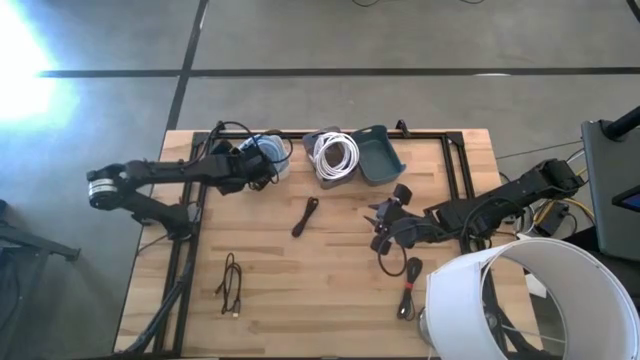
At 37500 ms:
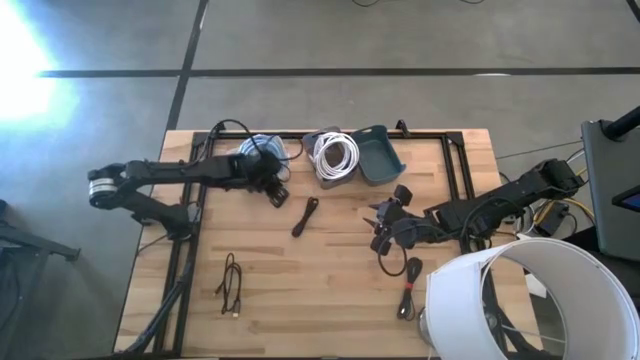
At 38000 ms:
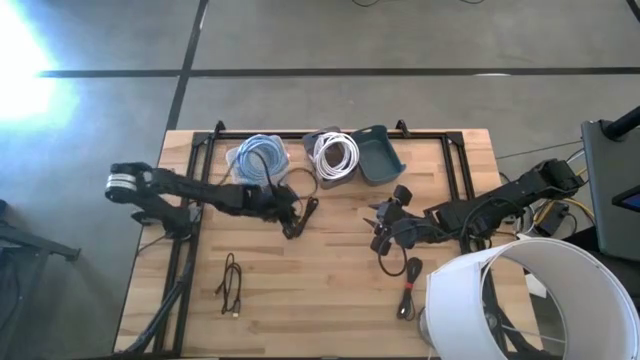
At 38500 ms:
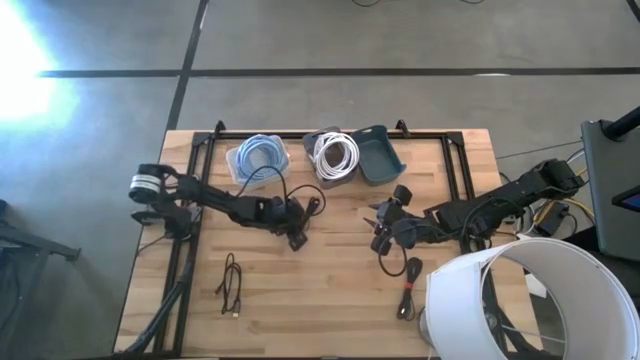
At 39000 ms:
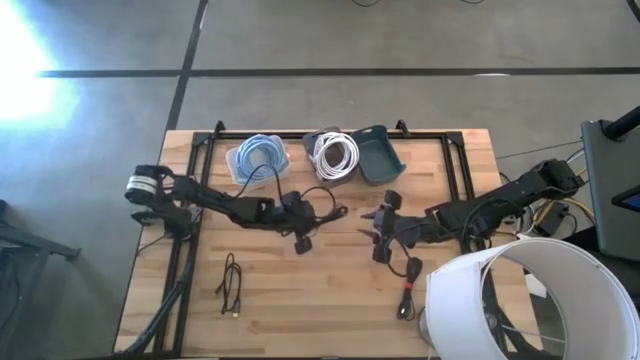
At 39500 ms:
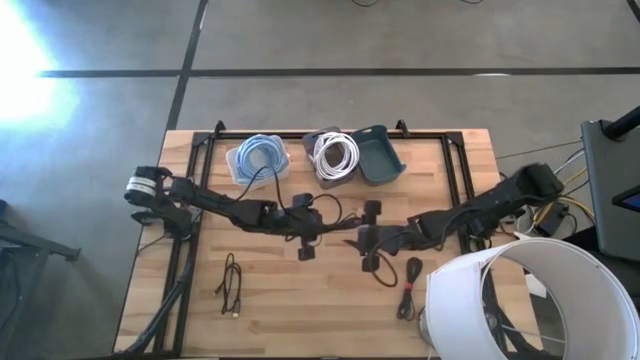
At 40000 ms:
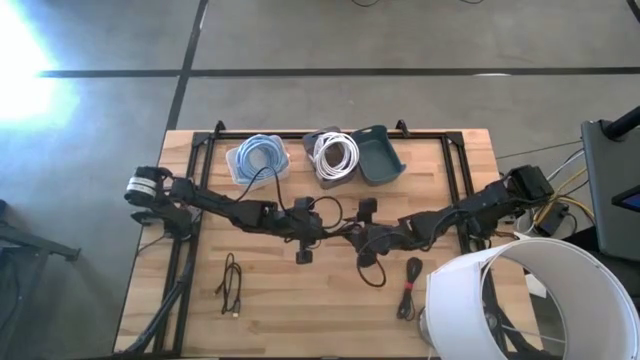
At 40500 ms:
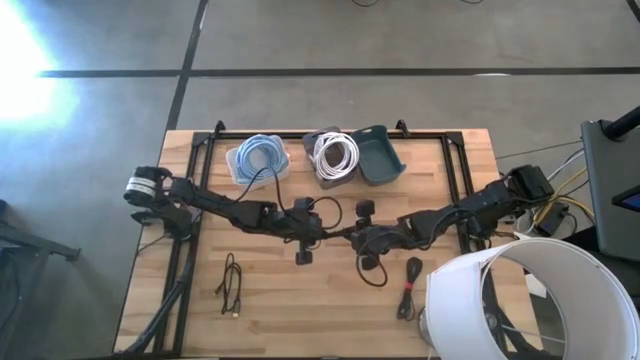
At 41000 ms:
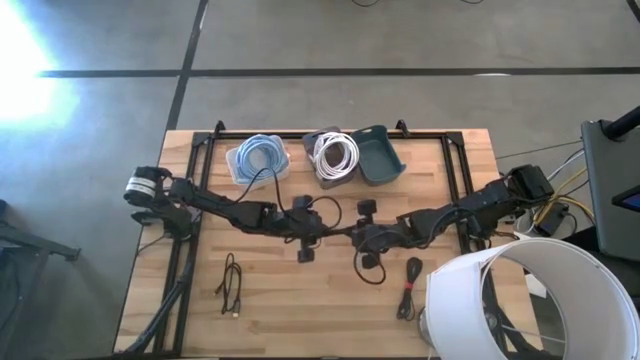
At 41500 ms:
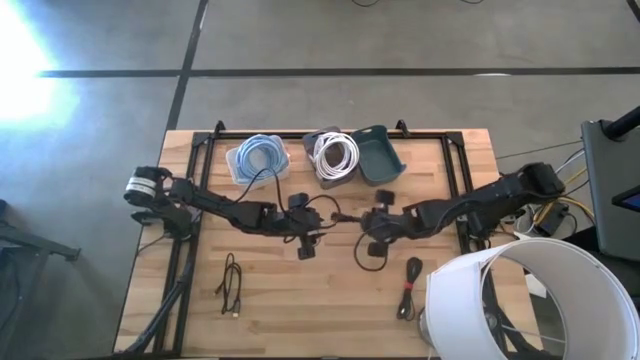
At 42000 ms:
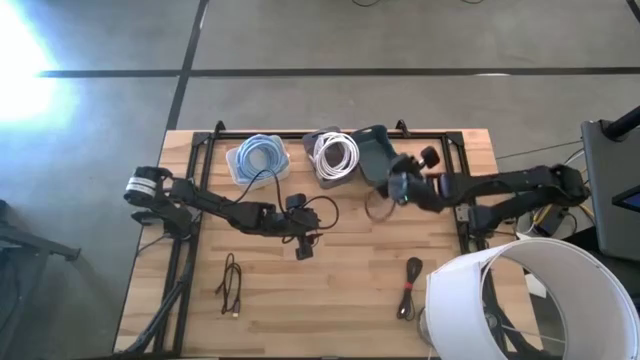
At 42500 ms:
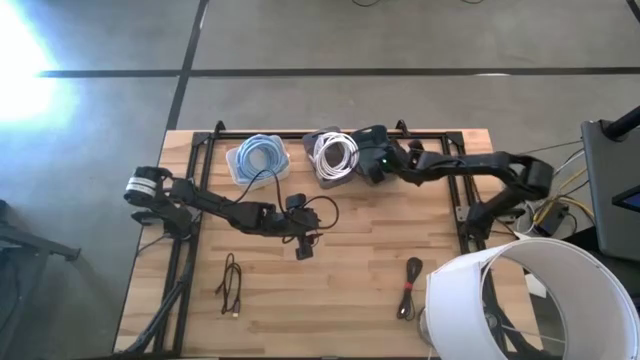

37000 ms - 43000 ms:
Task: Pick & Place USB Port
Put the top black USB cable into the green bin

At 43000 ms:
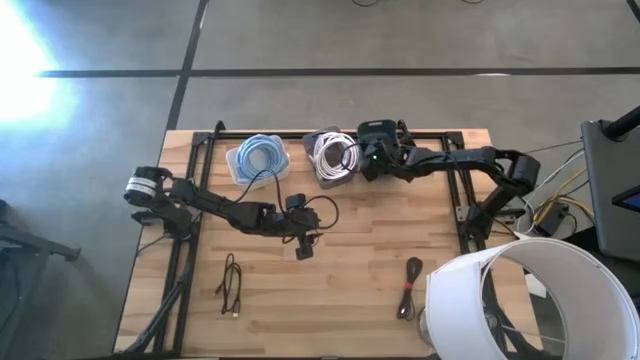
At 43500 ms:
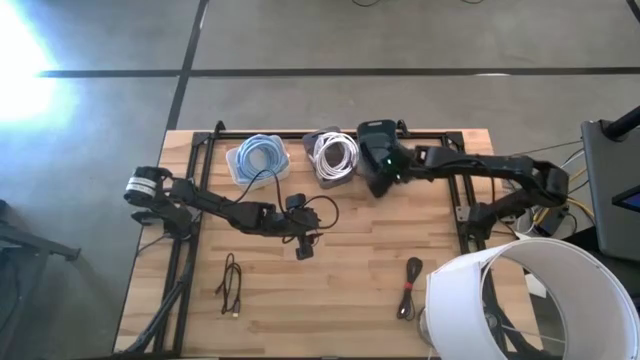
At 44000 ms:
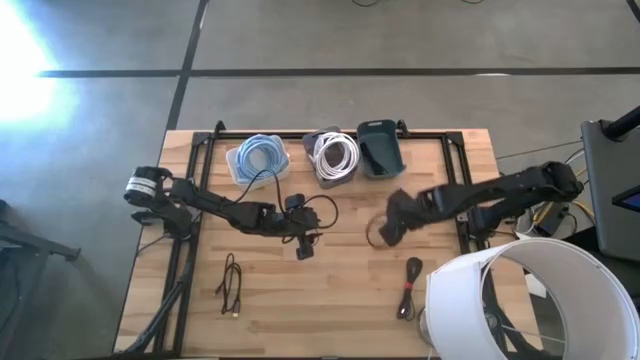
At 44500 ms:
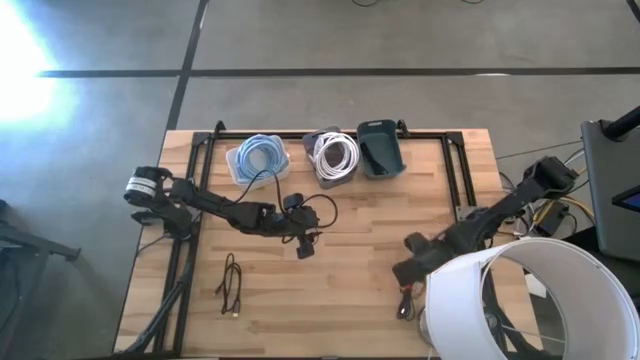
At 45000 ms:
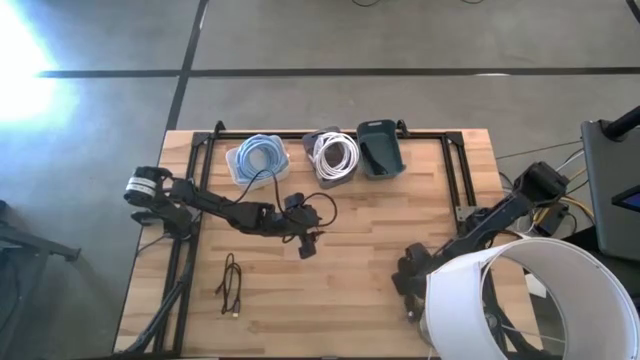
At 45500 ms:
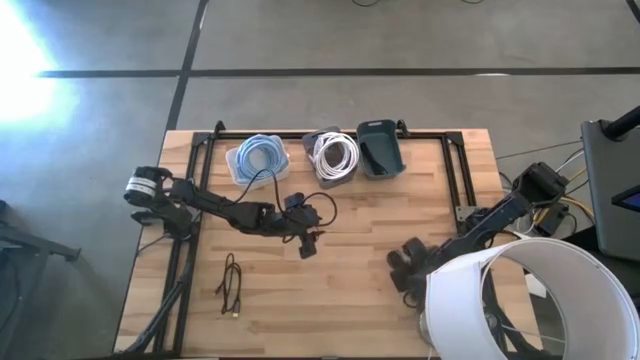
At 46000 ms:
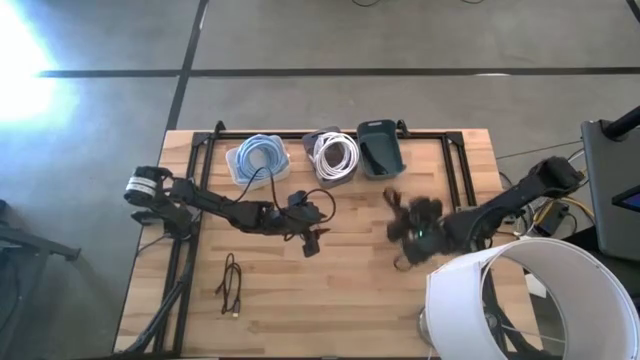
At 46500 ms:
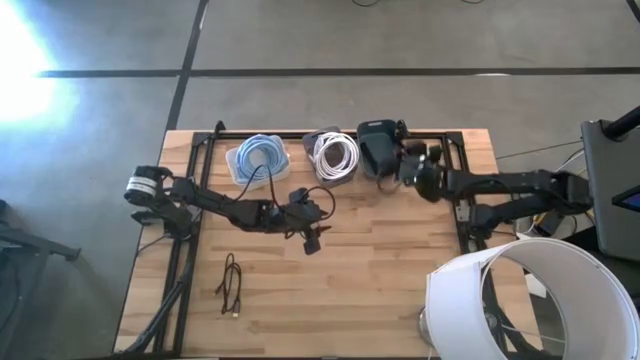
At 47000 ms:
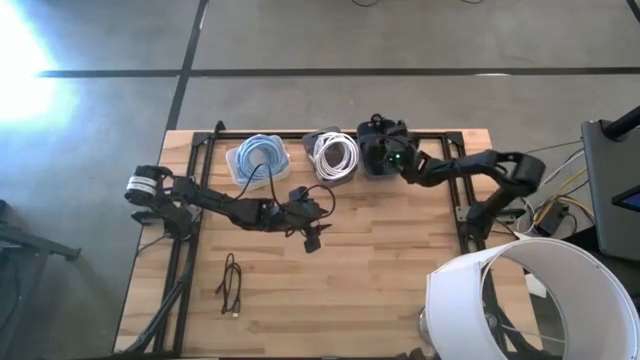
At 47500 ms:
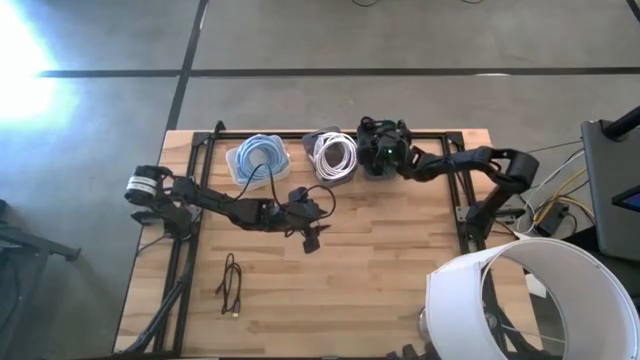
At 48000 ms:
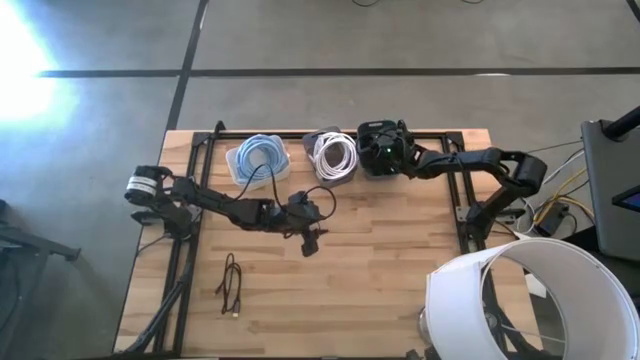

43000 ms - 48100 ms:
Put the right black USB cable into the green bin

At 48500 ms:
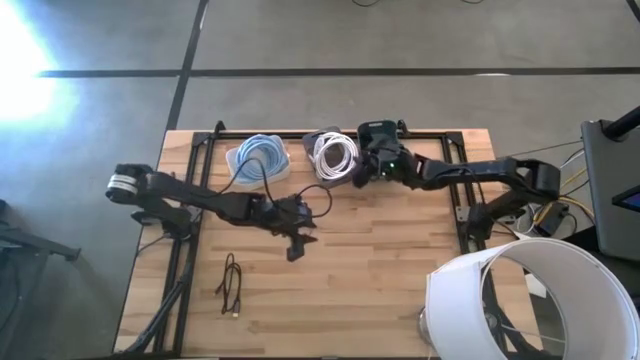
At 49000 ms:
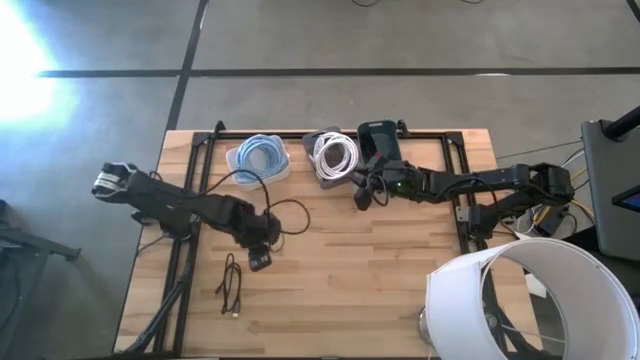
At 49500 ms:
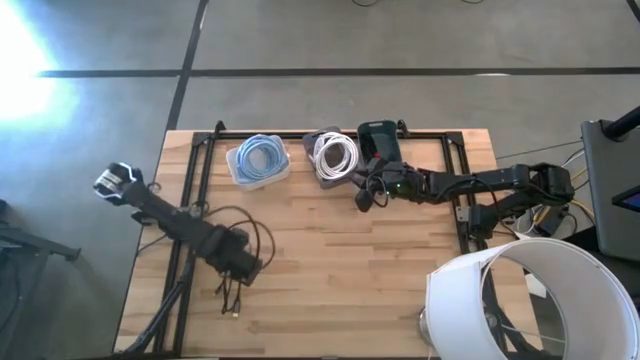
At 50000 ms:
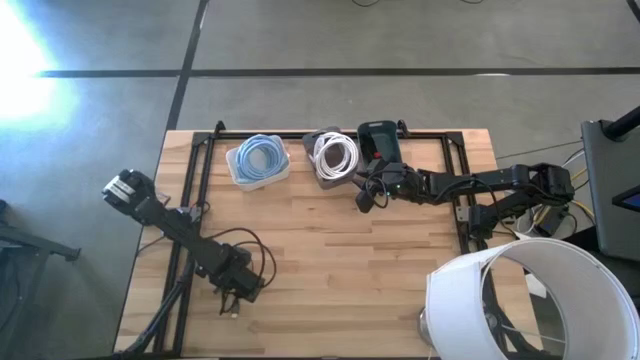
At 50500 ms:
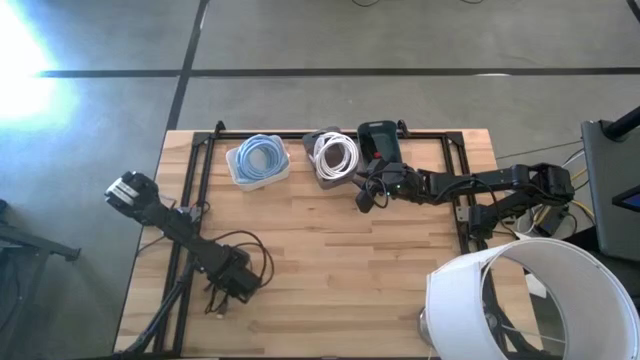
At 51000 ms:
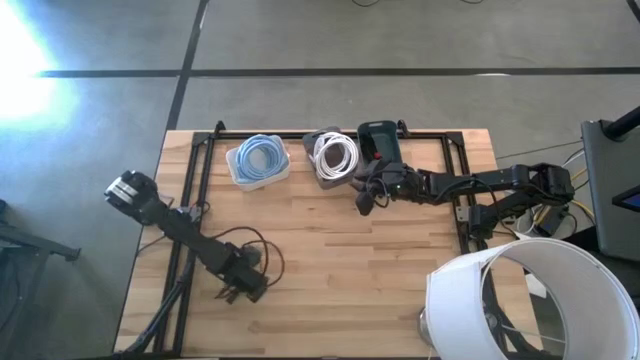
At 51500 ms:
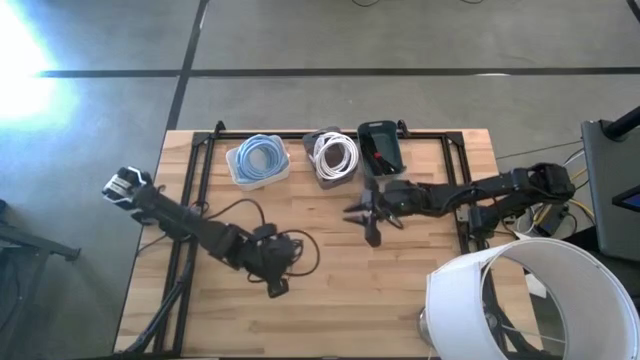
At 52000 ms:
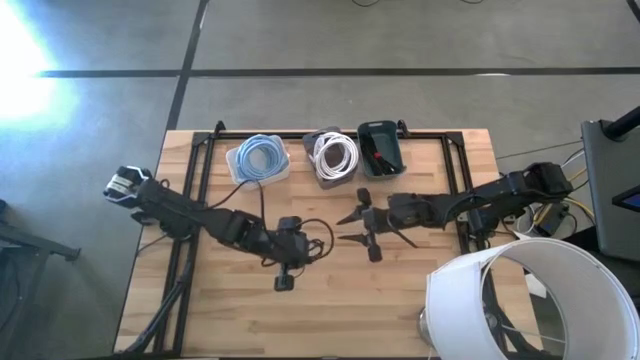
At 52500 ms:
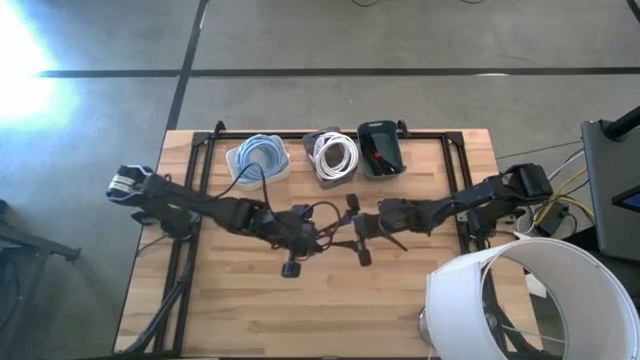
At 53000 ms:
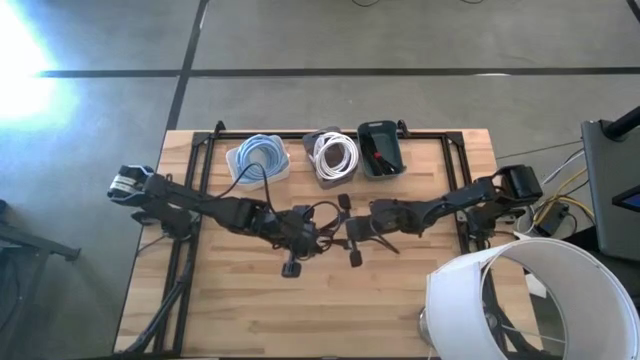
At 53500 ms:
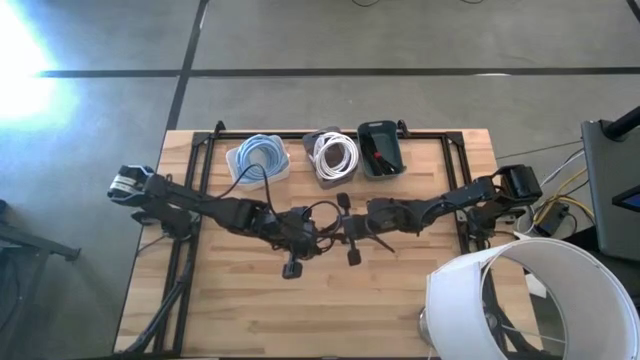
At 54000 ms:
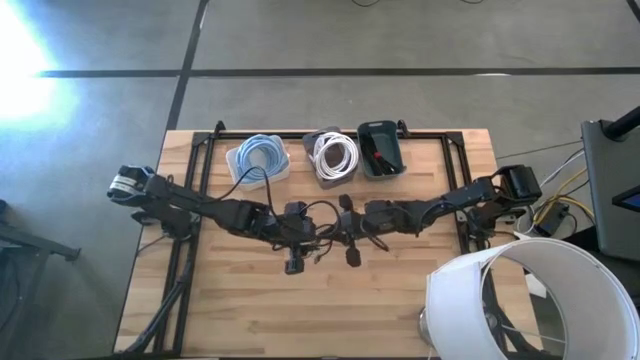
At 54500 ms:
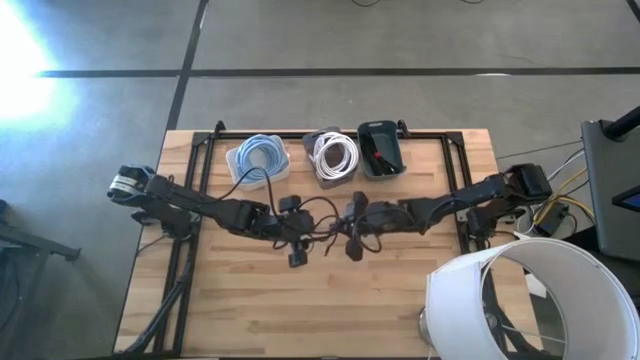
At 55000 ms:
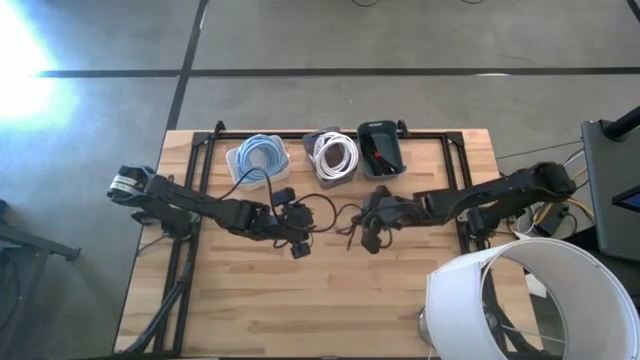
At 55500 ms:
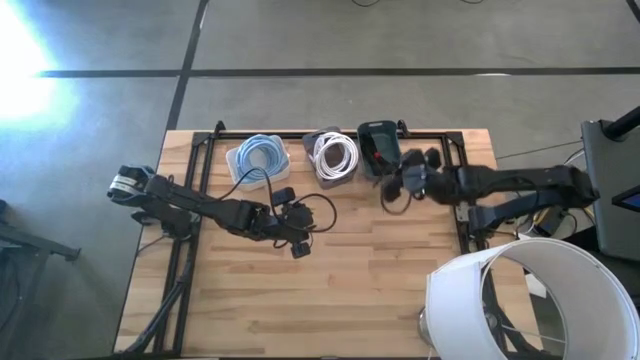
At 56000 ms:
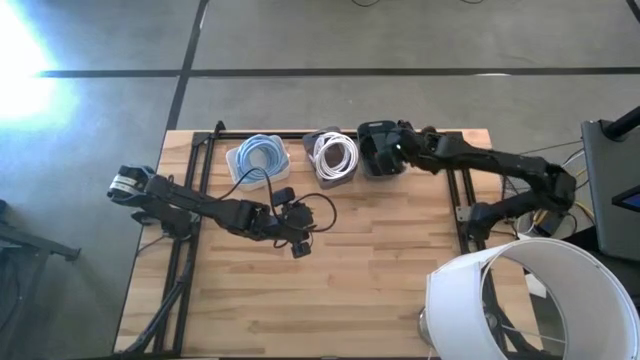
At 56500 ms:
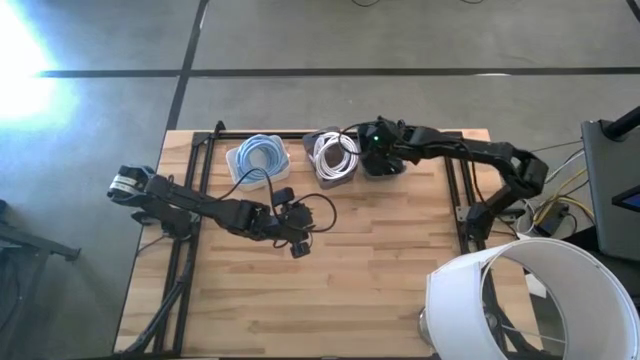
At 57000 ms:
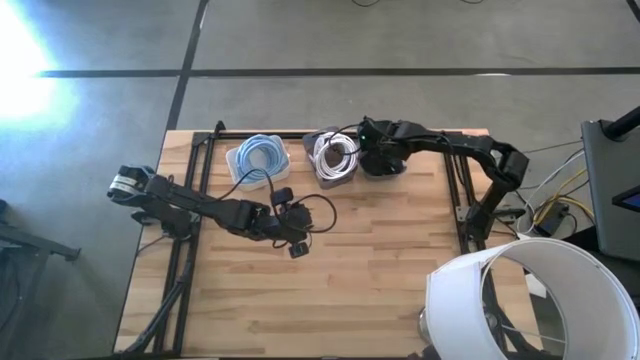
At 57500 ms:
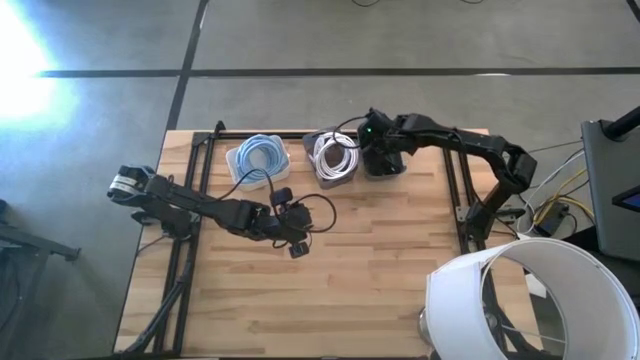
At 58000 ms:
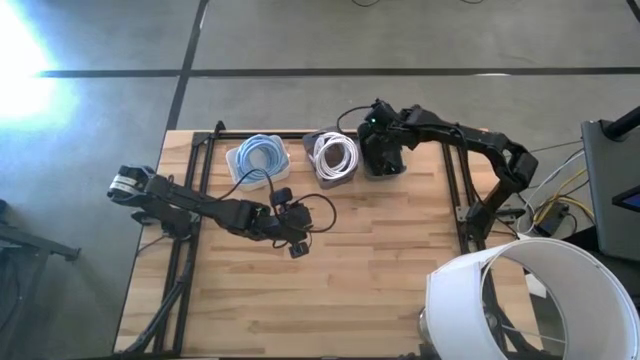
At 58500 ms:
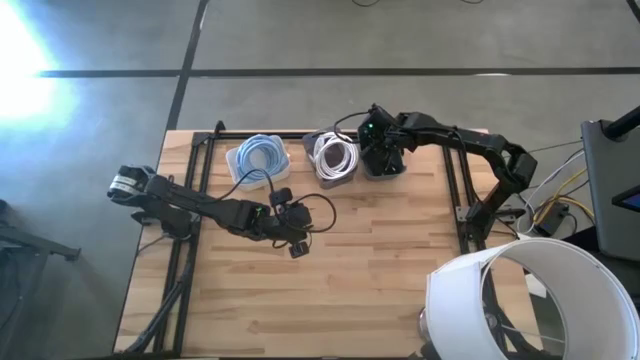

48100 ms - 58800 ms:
Put the black USB cable into the green bin
